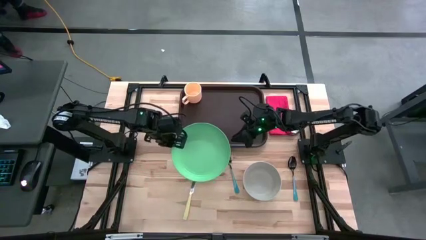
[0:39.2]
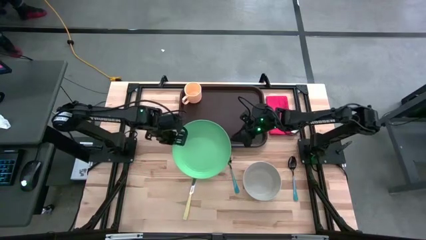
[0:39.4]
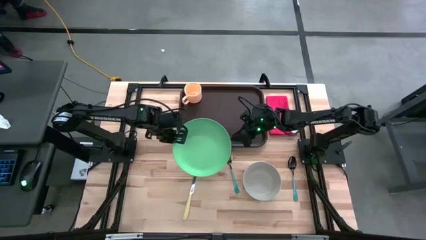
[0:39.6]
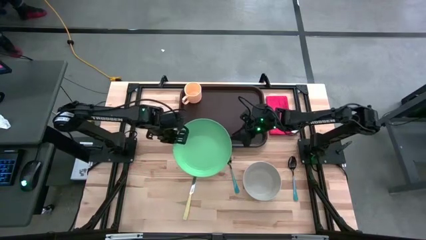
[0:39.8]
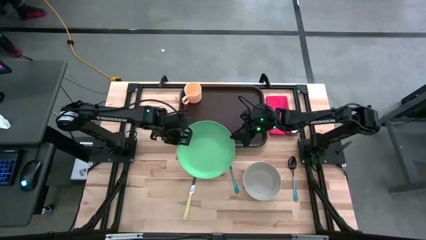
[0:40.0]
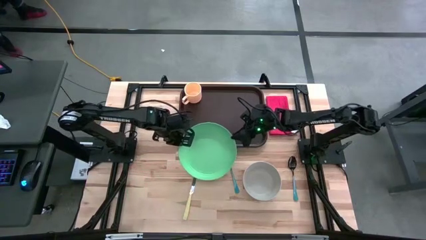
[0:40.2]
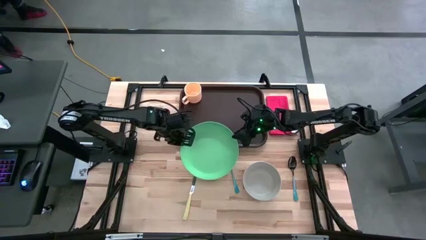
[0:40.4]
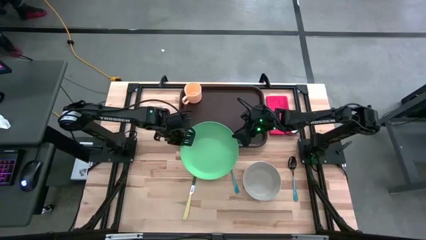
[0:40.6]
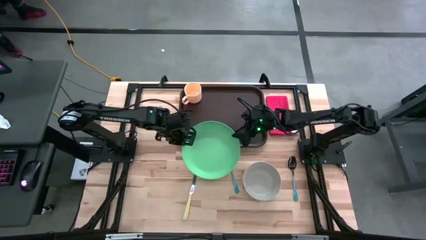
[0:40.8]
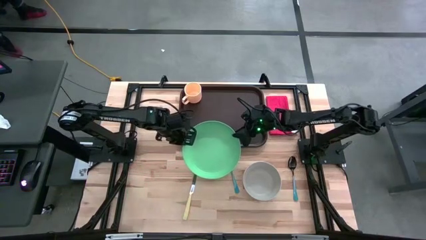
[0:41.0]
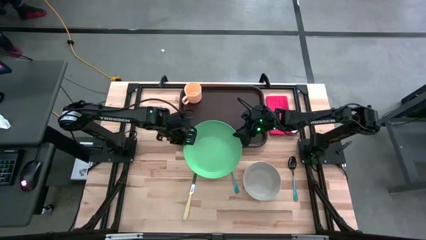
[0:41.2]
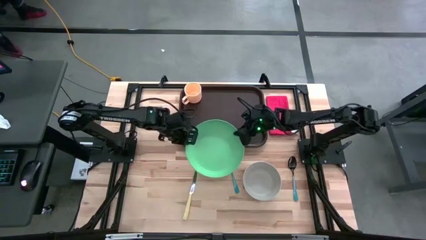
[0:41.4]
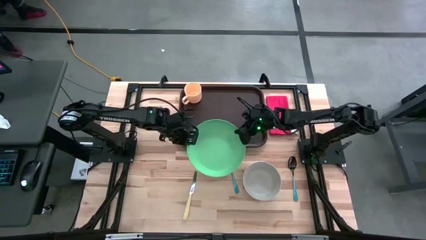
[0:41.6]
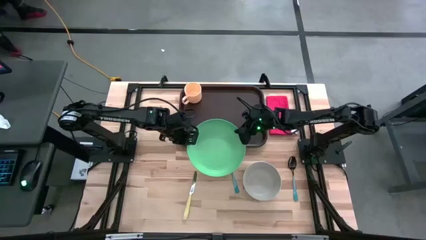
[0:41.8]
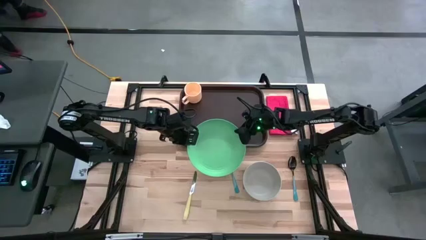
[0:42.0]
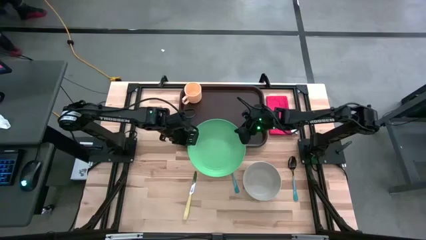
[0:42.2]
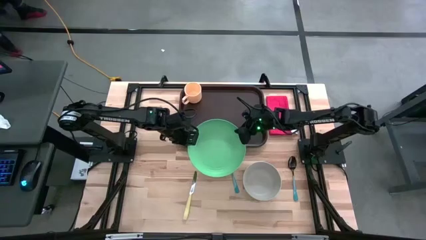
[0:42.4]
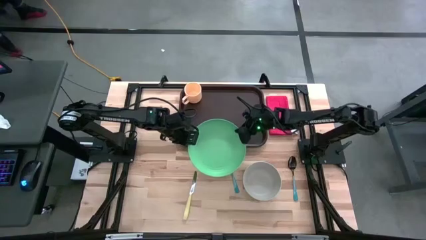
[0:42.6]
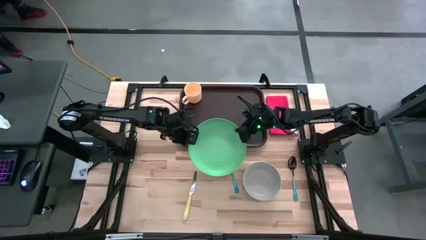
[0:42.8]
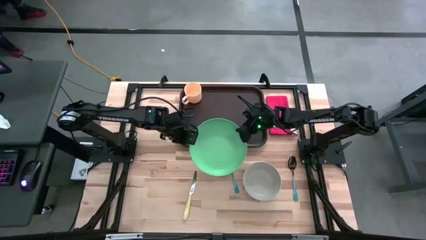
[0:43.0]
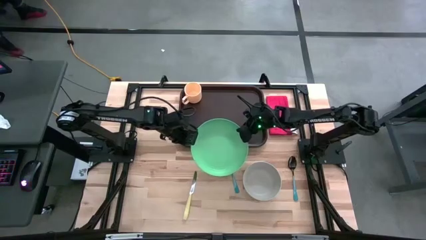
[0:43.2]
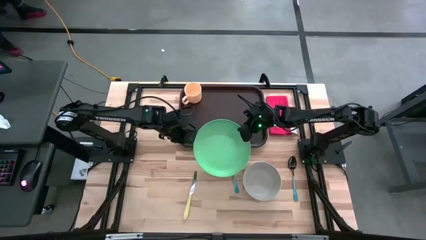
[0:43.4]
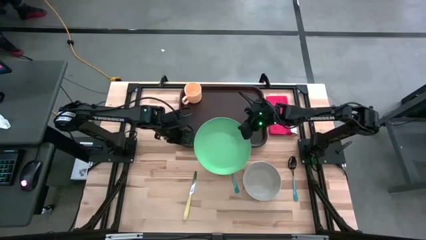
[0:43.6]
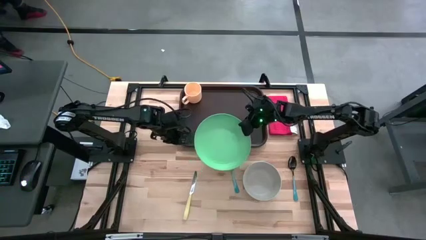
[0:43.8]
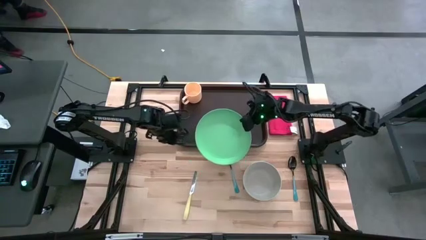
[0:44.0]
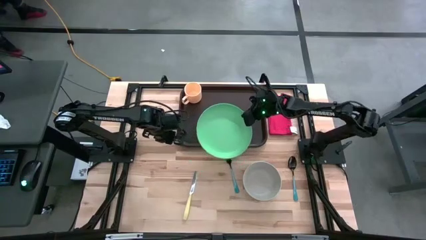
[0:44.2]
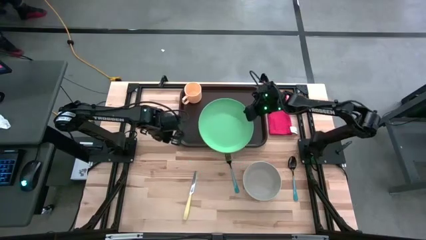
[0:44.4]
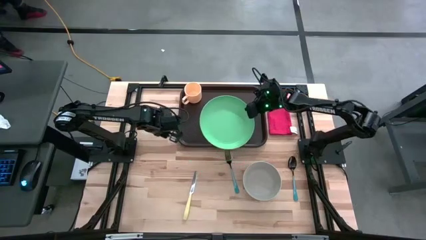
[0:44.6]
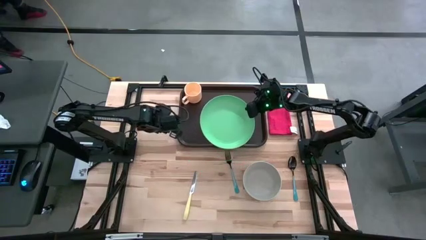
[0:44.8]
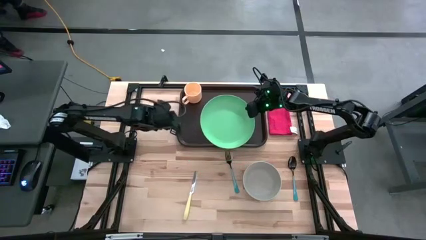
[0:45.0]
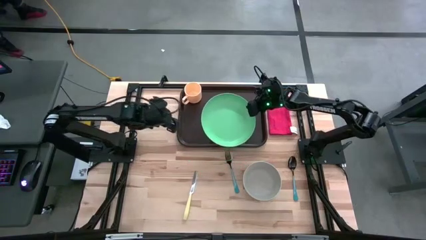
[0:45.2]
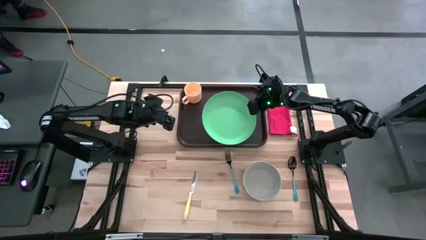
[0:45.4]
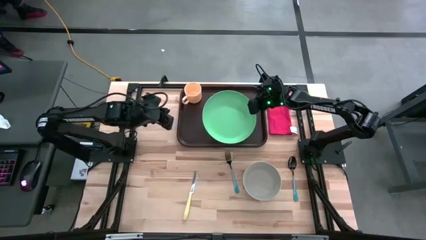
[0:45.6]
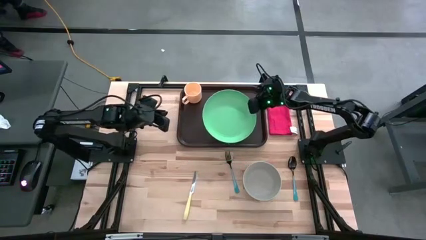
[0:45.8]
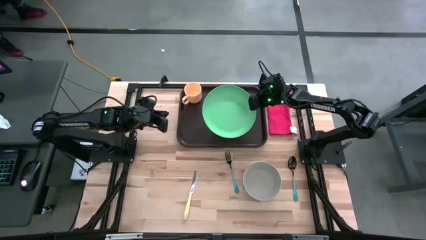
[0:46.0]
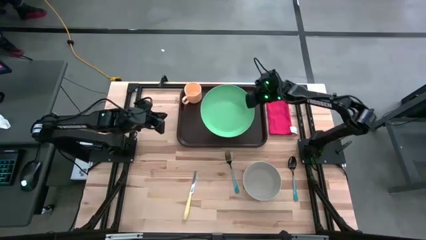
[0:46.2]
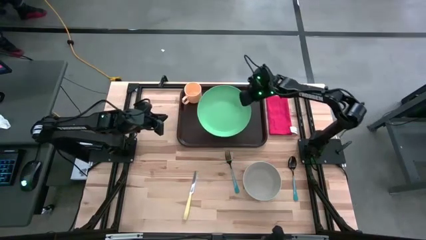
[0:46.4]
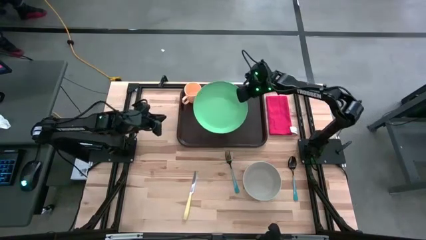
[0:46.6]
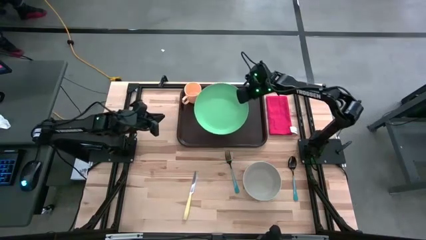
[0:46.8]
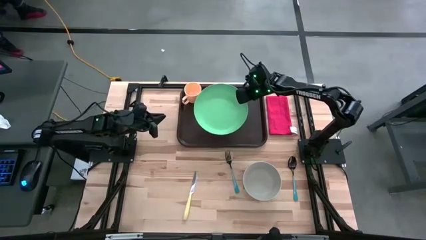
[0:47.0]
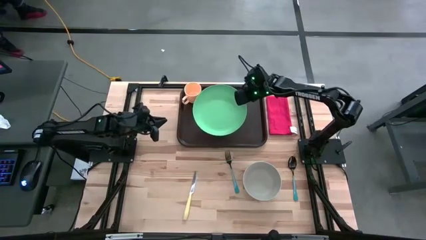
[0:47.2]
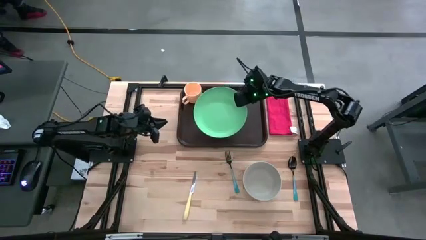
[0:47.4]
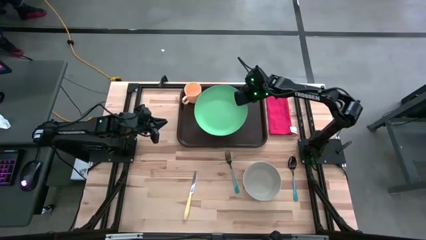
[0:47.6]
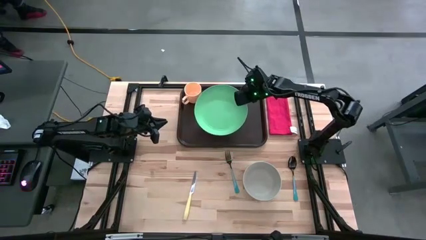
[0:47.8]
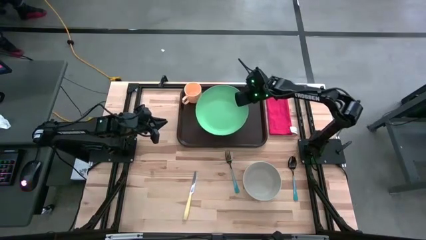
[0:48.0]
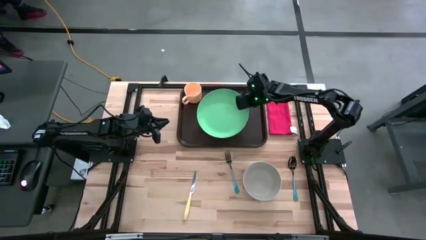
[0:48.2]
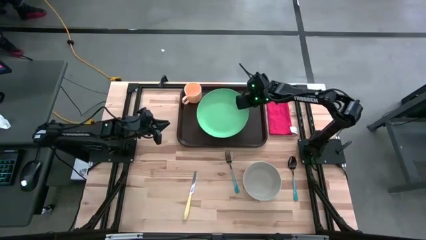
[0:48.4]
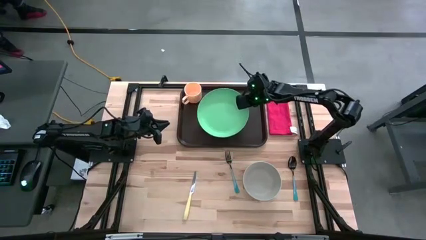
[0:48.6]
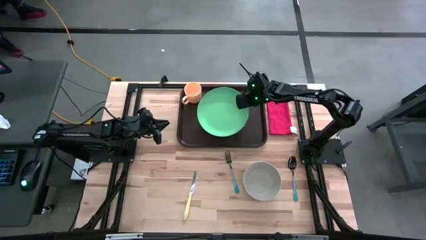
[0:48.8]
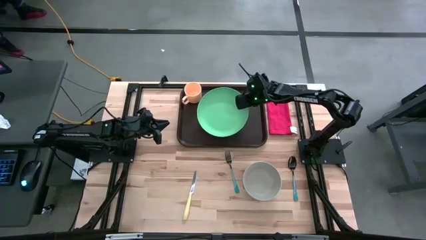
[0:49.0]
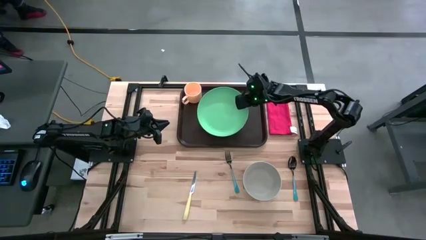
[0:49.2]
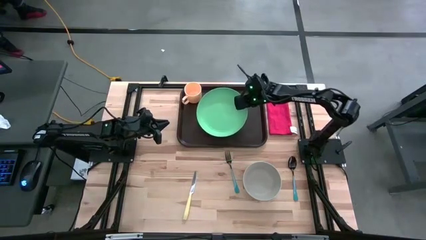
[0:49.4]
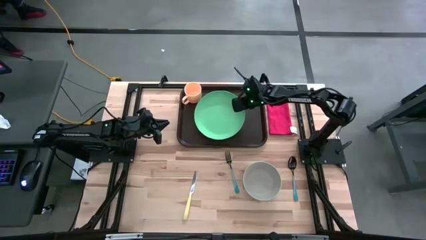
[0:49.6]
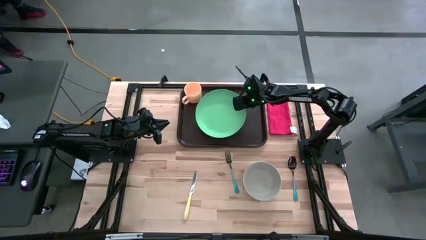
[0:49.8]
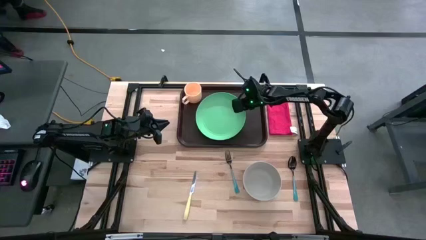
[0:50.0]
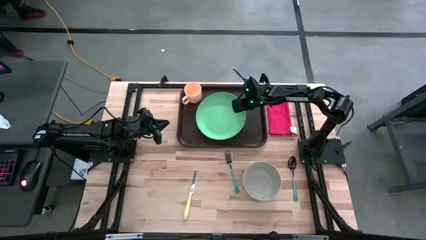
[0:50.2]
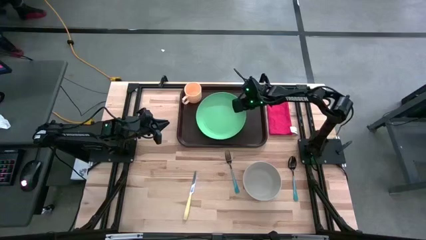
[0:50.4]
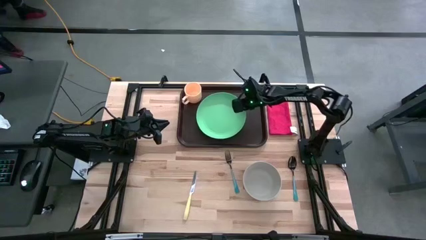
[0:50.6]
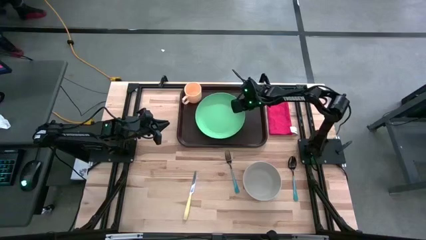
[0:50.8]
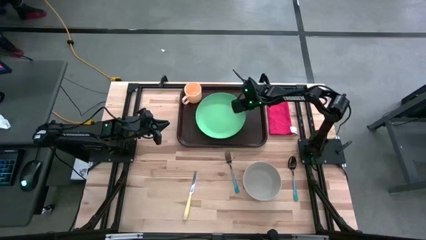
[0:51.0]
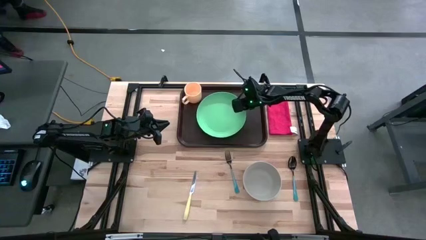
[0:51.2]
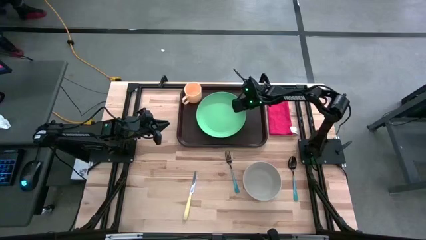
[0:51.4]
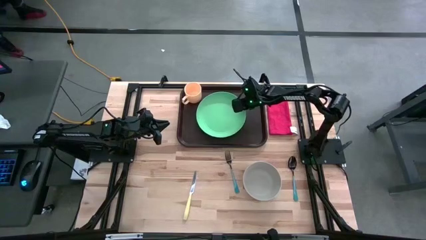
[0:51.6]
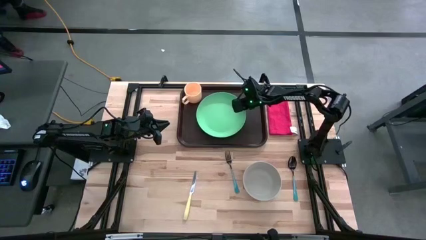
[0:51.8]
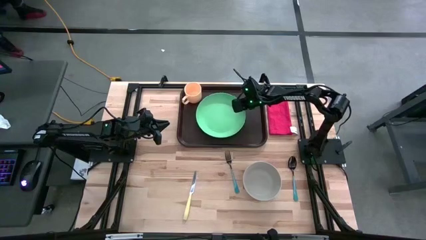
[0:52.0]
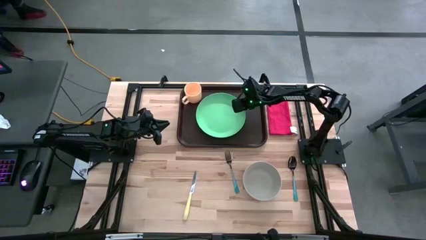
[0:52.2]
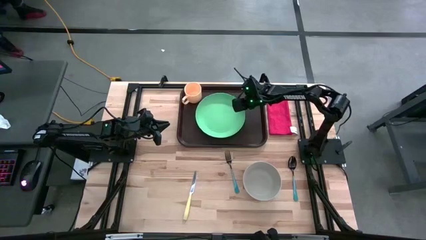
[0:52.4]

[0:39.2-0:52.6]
Task: Set up tray
Put the green plate on the brown serving tray to the bottom right of the yellow mug
